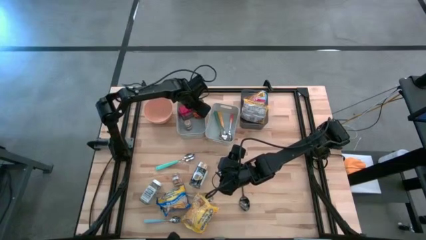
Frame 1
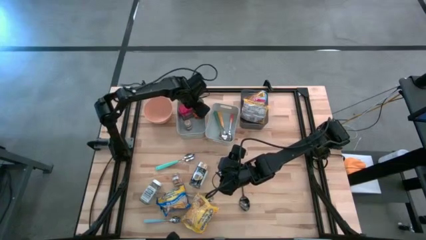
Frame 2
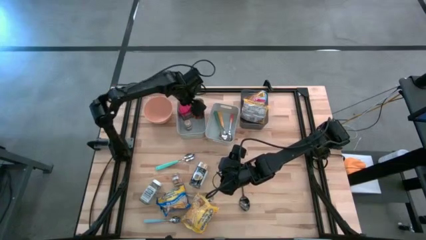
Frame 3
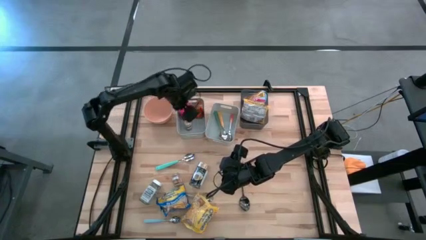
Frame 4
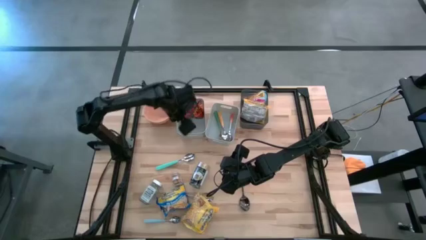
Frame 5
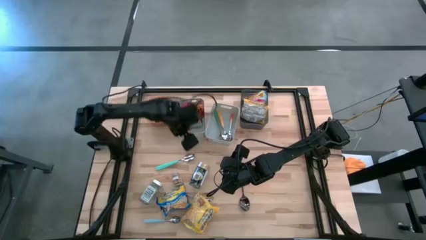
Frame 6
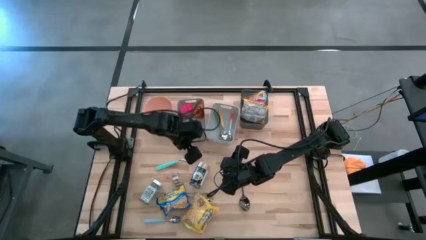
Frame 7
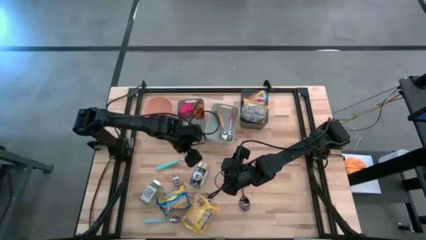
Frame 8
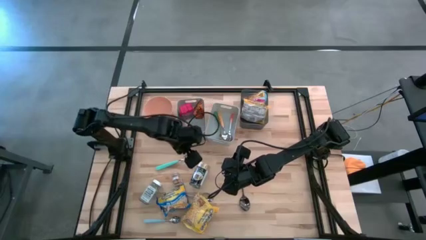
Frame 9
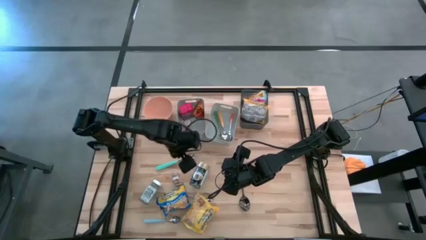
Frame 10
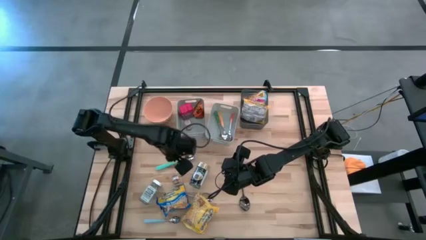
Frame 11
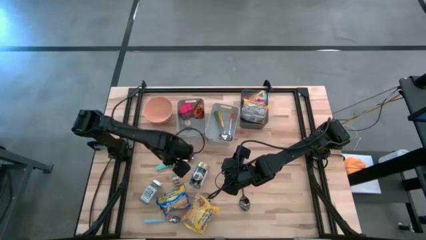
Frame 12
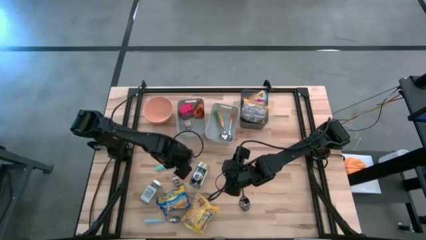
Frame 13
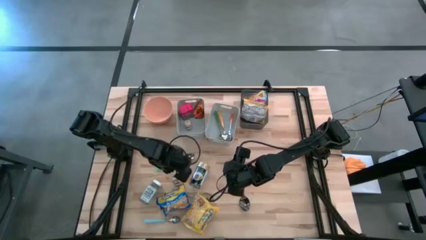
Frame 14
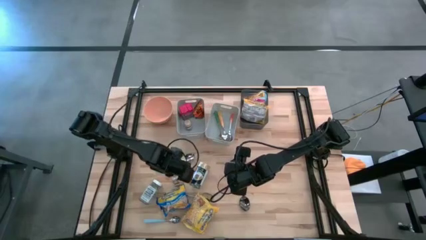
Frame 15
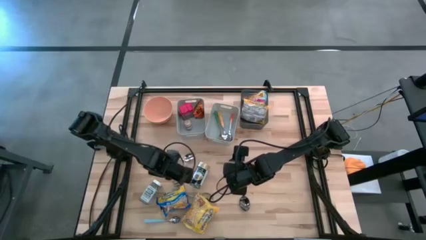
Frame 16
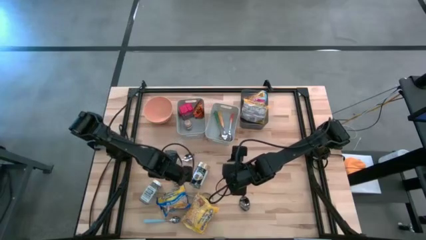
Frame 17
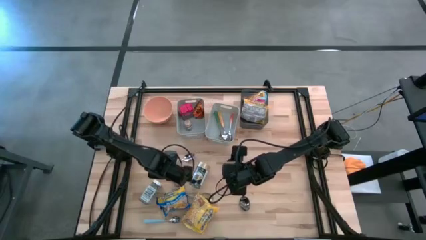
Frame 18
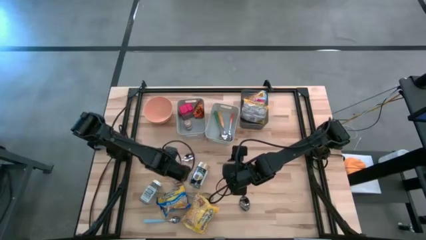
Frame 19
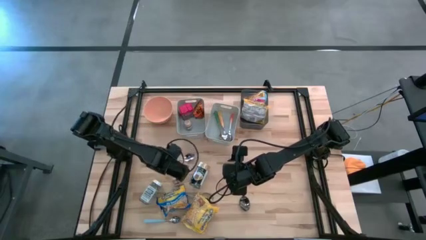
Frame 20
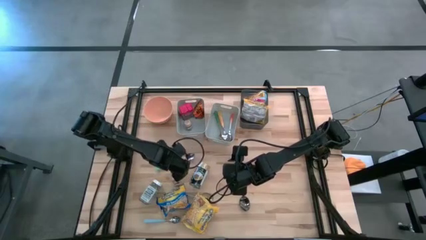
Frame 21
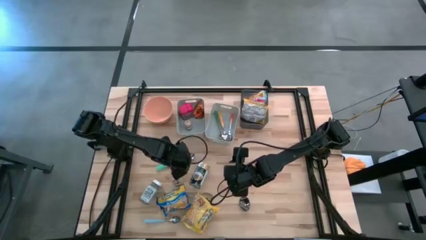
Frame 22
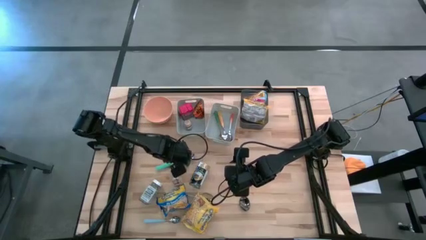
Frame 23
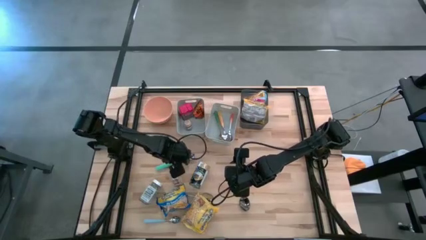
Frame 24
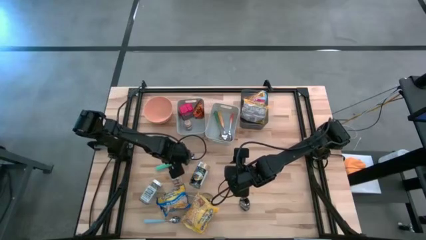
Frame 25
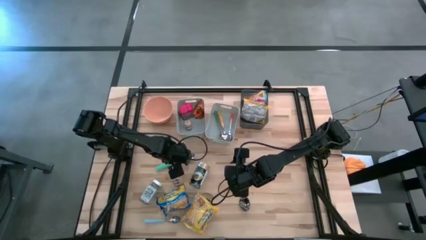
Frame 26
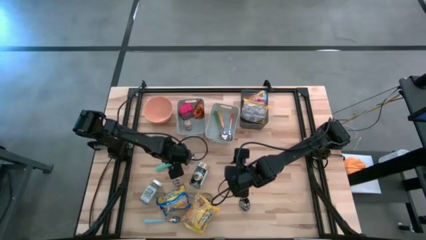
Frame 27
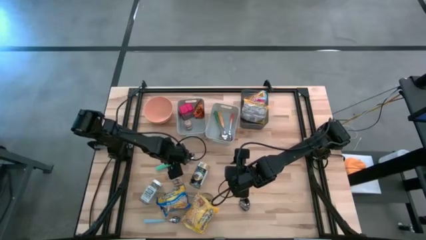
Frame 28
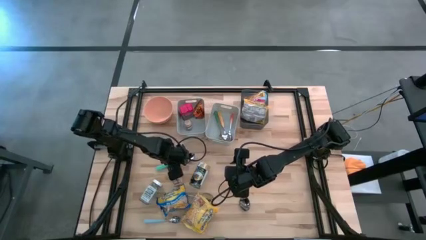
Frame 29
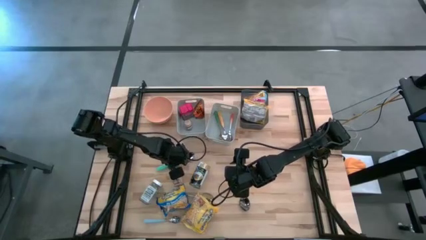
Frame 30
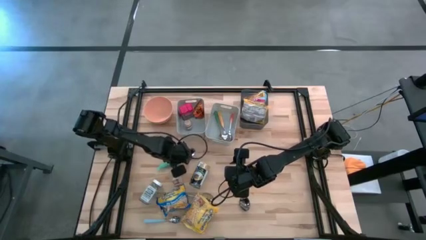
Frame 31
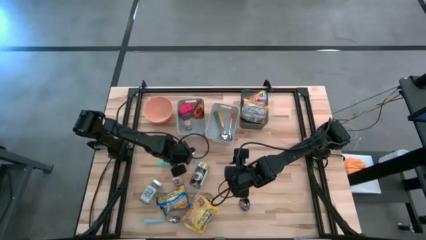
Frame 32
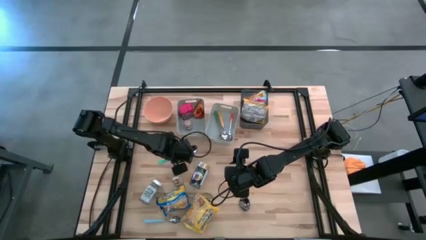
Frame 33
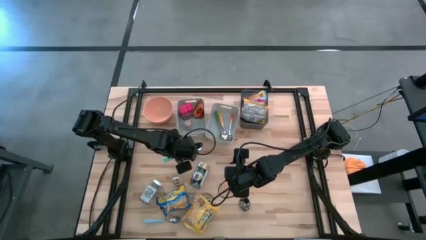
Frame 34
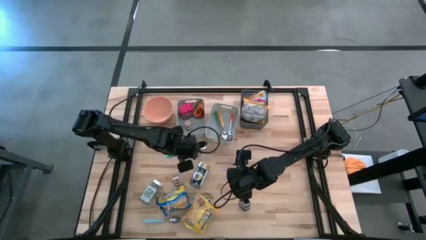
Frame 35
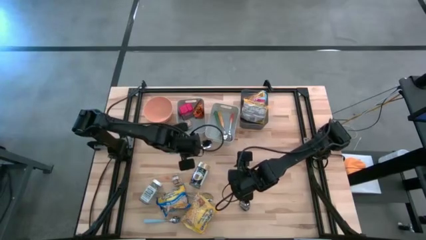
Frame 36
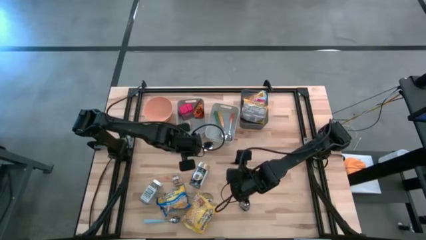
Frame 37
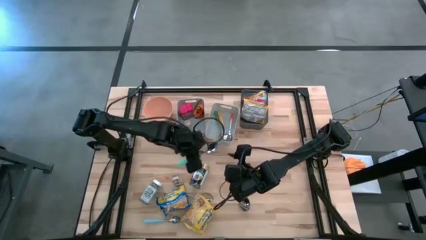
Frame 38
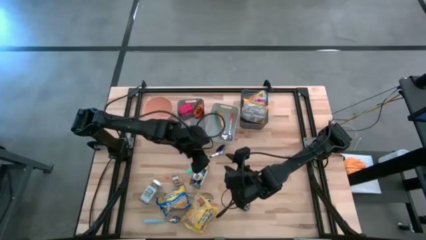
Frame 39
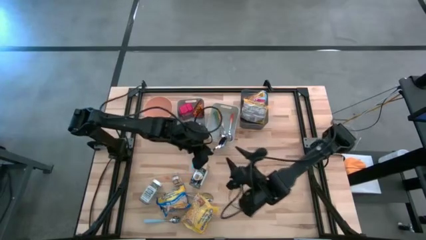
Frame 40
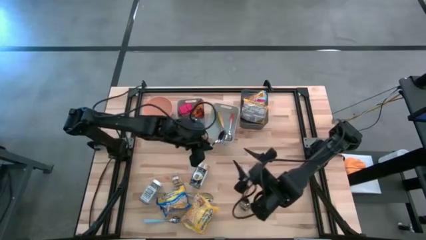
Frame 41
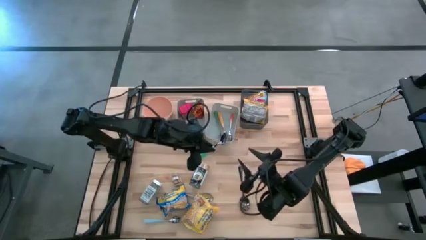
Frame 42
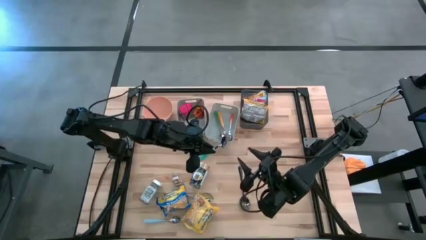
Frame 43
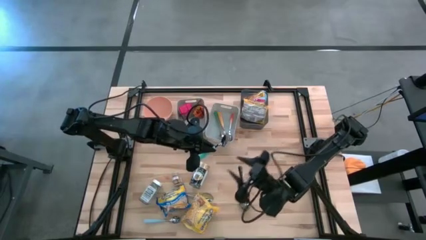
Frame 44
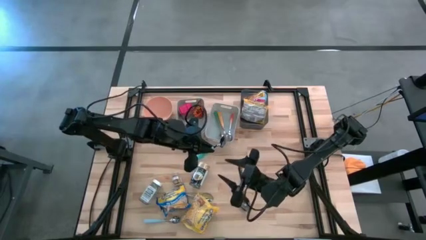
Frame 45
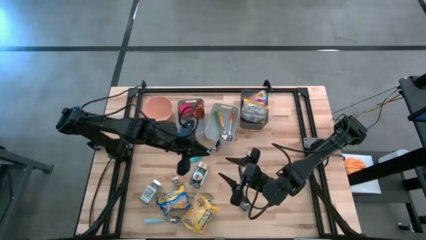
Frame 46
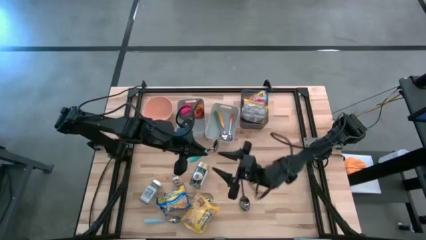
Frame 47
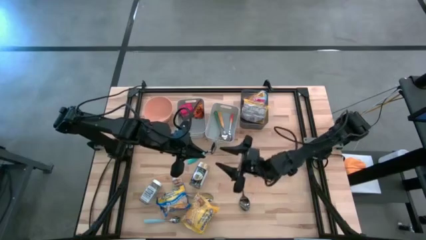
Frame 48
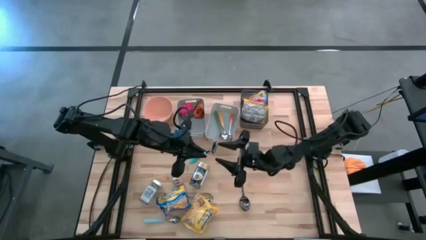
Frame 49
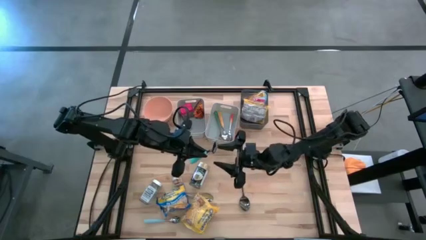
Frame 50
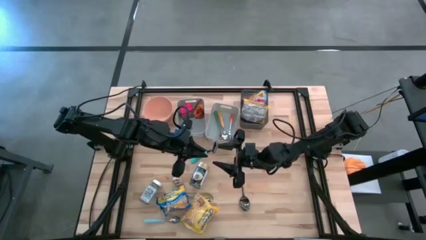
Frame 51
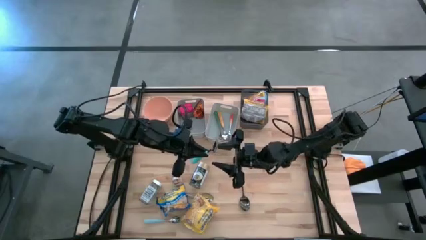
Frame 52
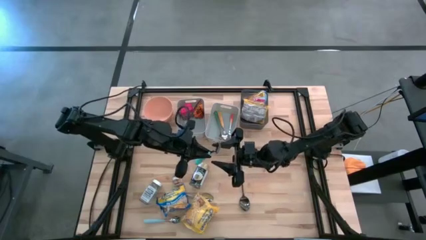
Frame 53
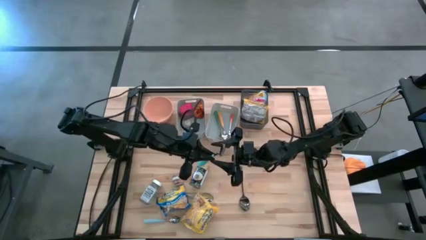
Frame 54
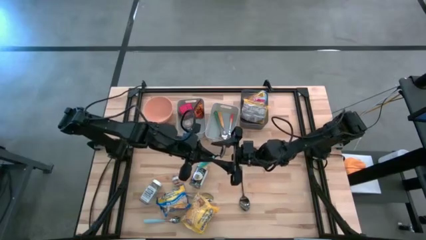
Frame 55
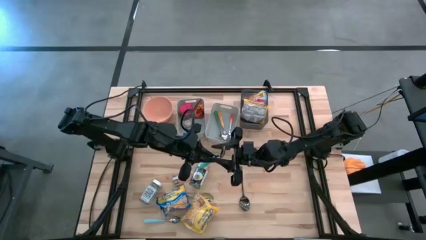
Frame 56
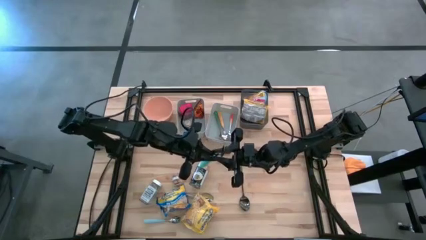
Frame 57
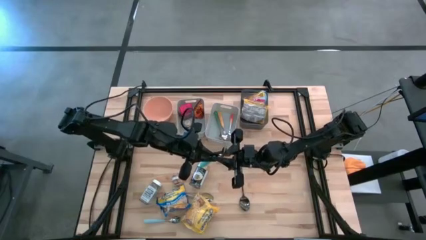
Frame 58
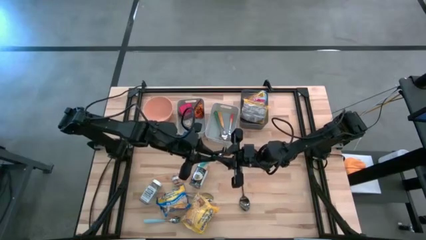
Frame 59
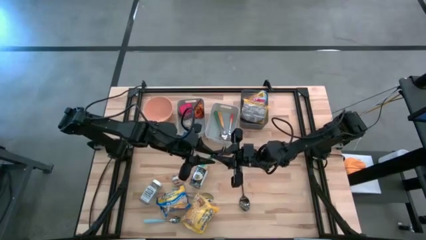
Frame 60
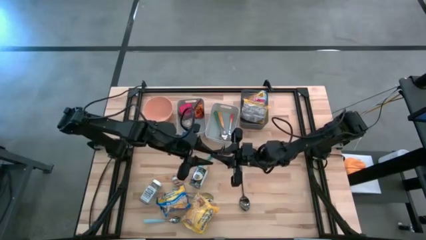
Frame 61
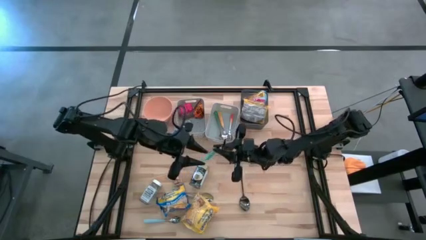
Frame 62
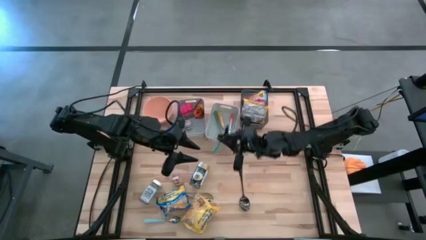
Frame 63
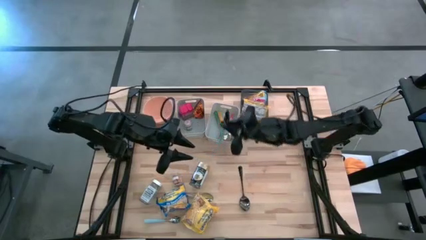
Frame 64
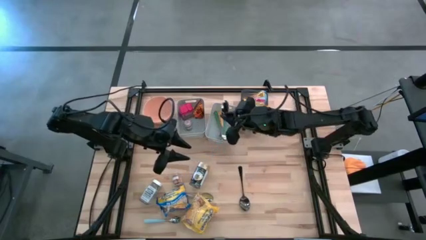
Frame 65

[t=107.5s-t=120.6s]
Put the blue green spoon into the right gray bin
